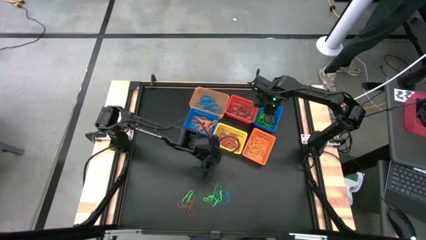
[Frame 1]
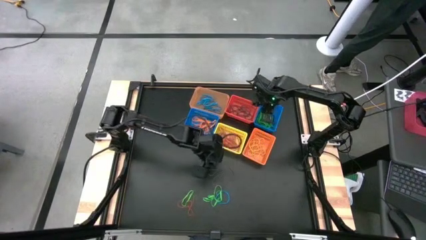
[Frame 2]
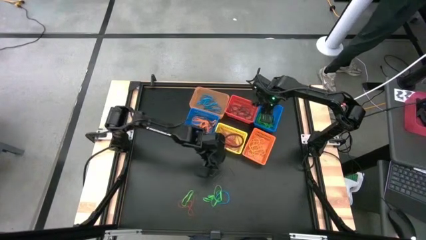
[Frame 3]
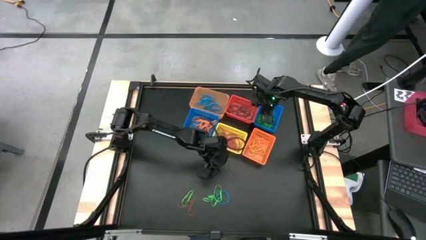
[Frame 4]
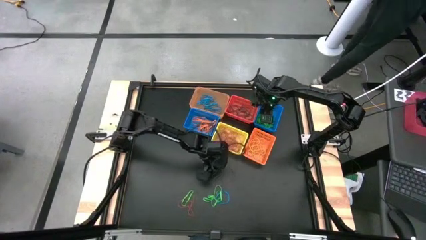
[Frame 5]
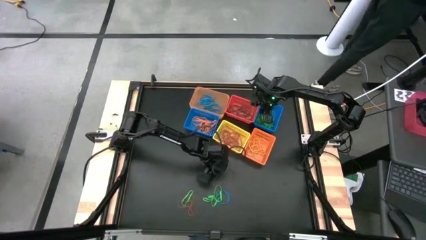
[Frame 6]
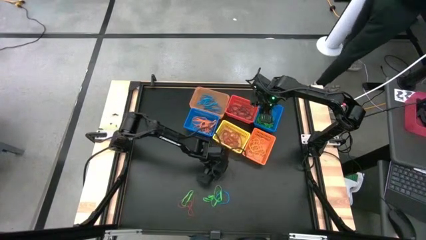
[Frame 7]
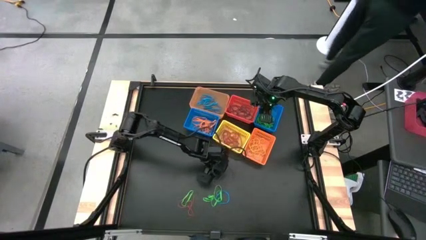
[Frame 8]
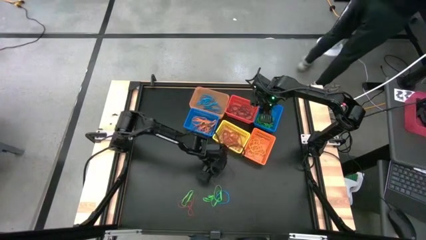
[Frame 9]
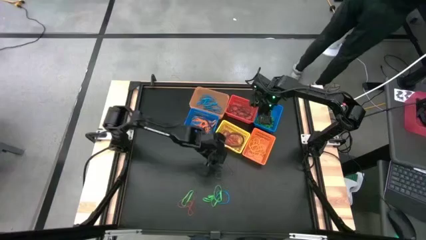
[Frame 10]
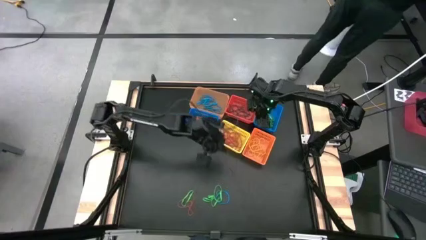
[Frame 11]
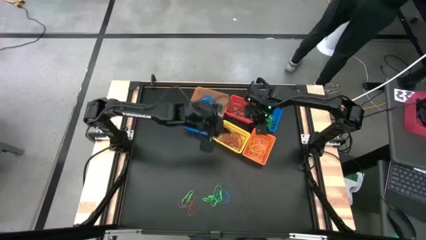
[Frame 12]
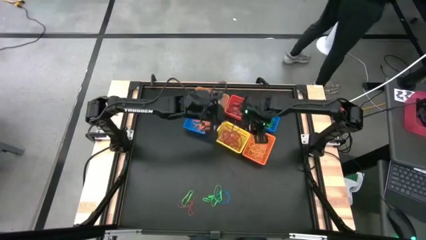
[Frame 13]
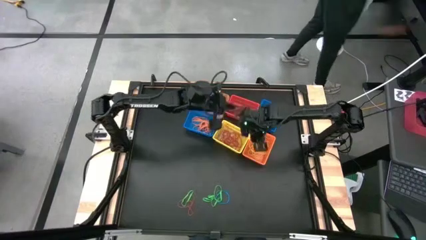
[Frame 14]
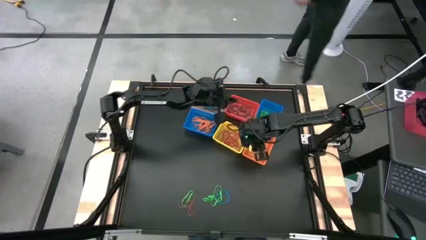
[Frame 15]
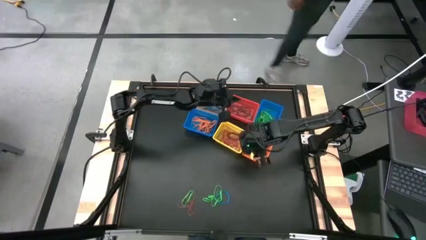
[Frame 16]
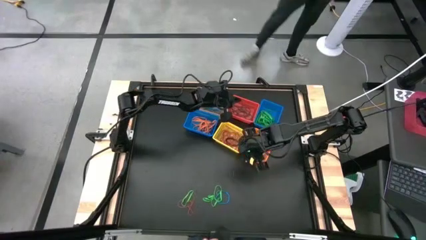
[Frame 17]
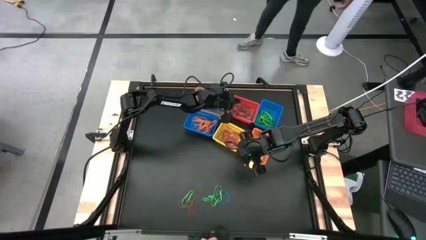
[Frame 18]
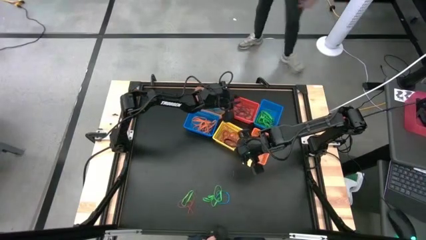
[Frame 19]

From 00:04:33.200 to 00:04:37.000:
Task: Sort rubber bands into baskets
Put the violet rubber band into the pink basket

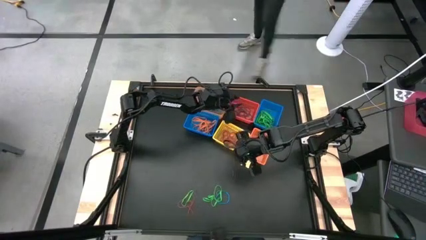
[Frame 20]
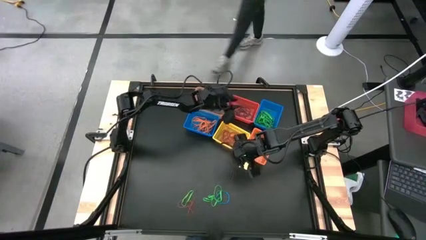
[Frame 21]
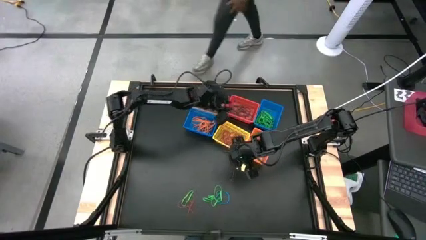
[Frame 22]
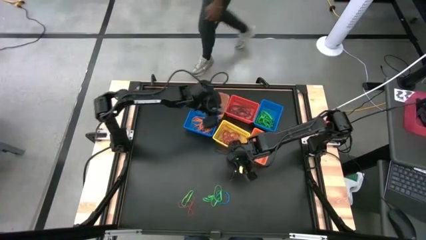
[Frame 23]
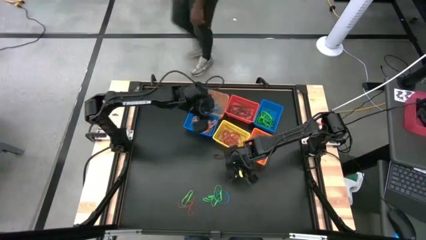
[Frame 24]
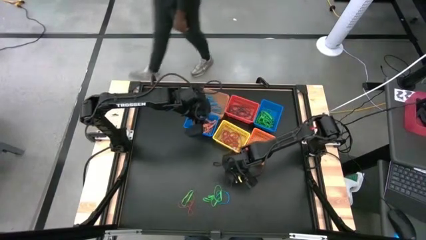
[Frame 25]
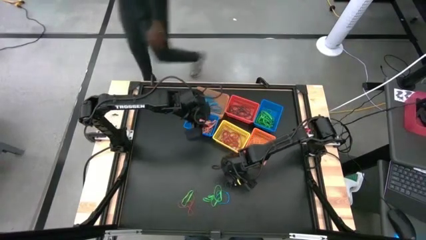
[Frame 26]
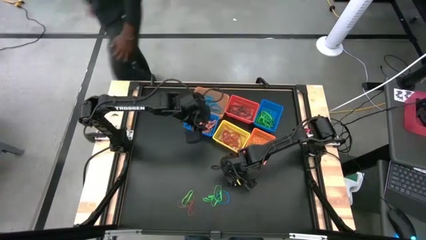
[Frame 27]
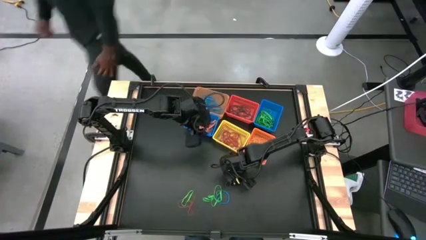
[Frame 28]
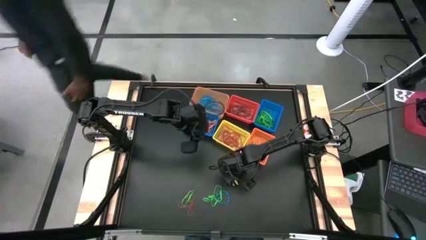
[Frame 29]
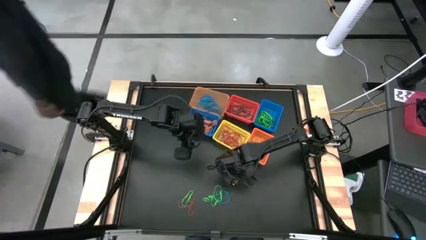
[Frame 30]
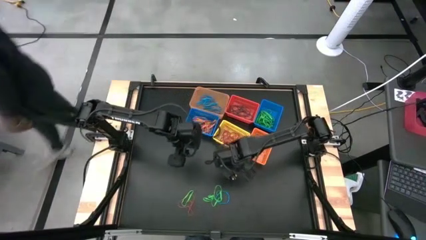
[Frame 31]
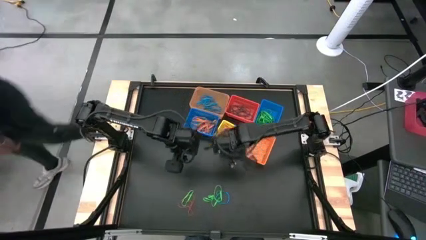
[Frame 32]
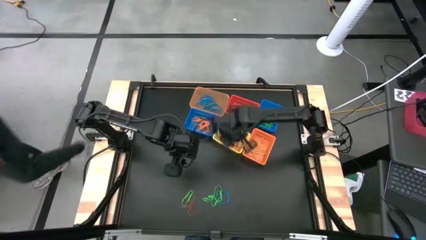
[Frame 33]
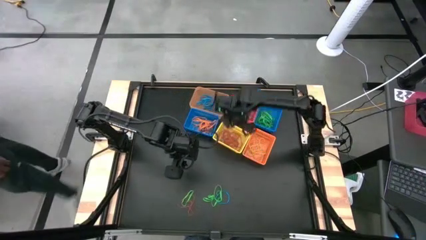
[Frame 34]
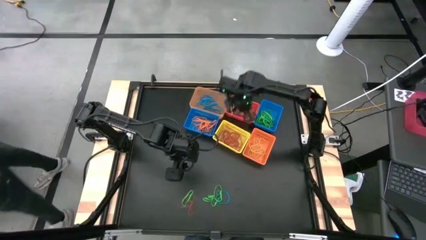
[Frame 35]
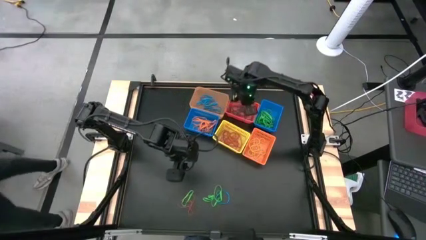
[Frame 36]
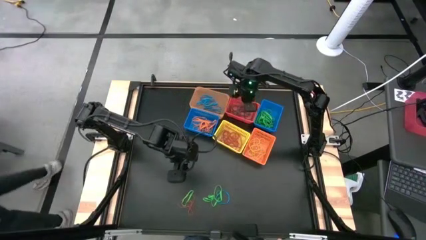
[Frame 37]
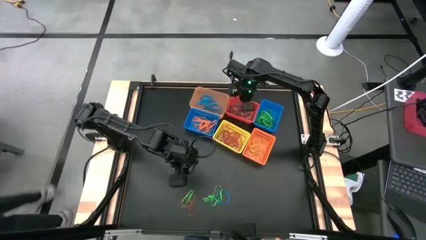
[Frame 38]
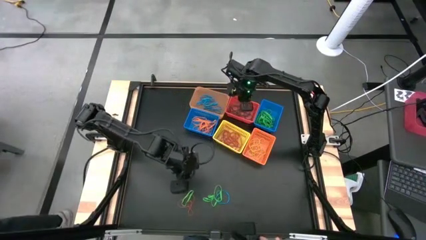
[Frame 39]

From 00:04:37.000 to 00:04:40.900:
Put the violet rubber band into the pink basket

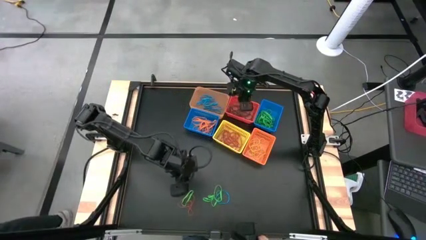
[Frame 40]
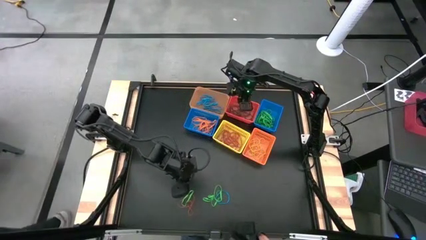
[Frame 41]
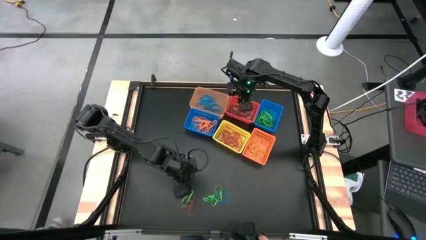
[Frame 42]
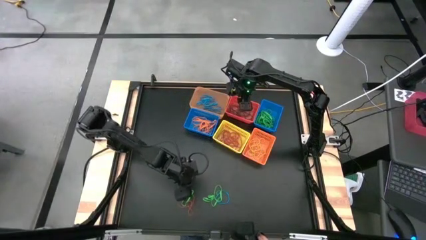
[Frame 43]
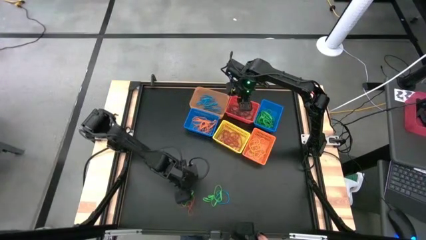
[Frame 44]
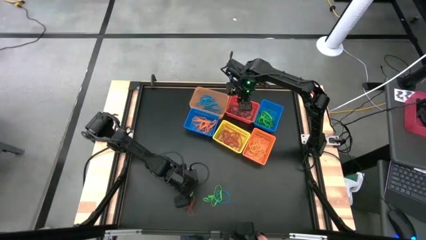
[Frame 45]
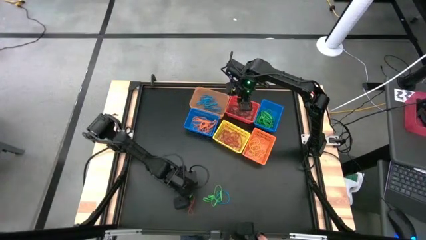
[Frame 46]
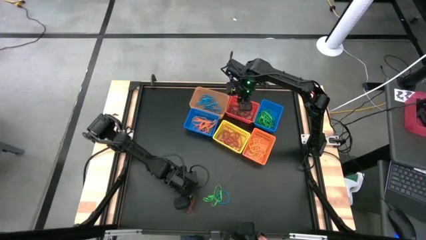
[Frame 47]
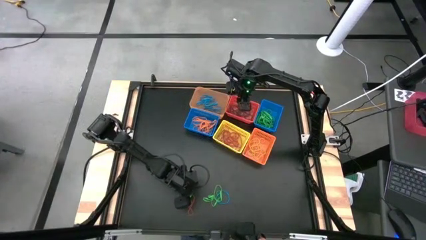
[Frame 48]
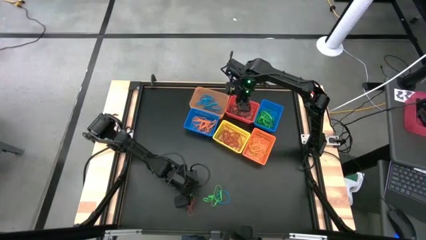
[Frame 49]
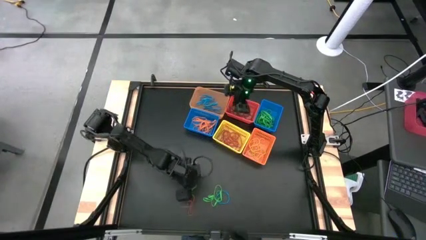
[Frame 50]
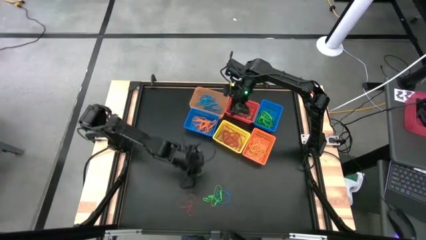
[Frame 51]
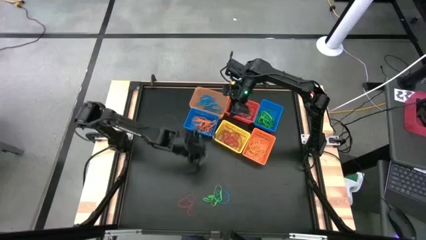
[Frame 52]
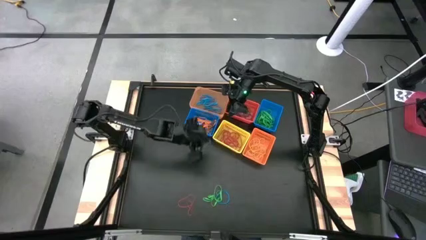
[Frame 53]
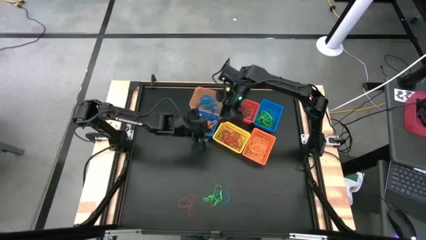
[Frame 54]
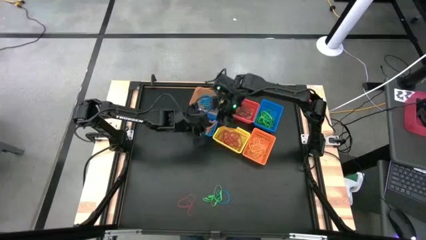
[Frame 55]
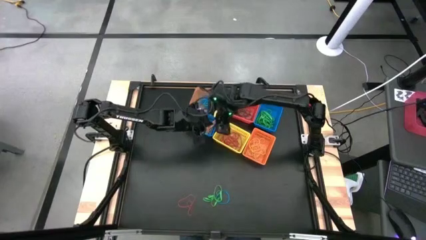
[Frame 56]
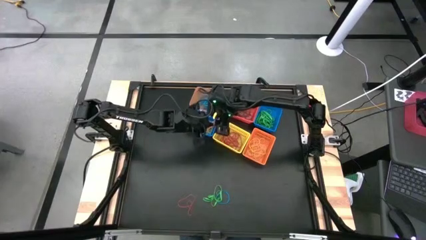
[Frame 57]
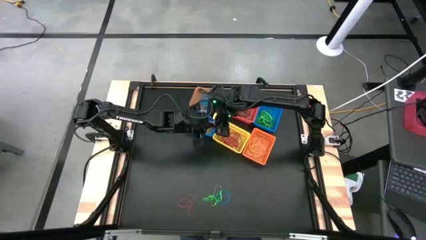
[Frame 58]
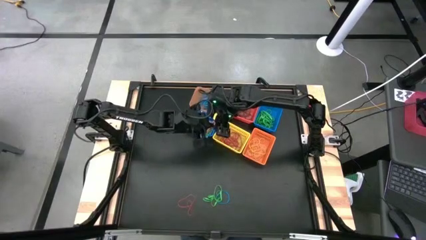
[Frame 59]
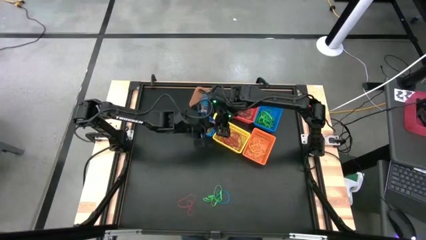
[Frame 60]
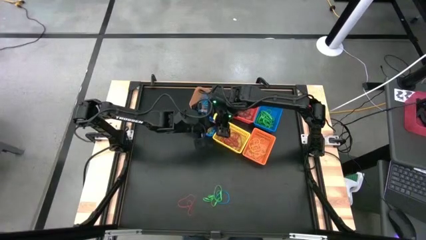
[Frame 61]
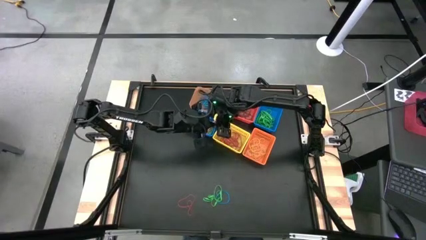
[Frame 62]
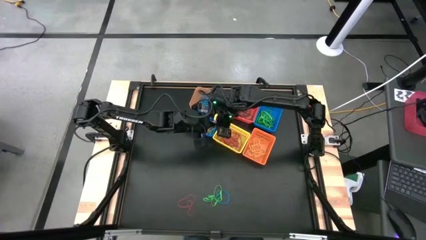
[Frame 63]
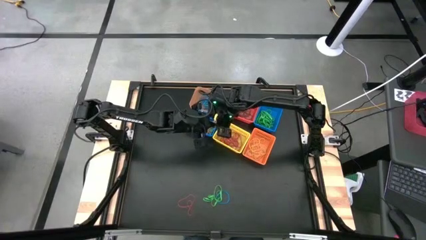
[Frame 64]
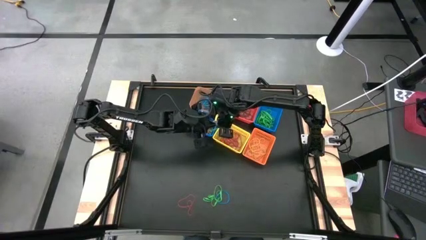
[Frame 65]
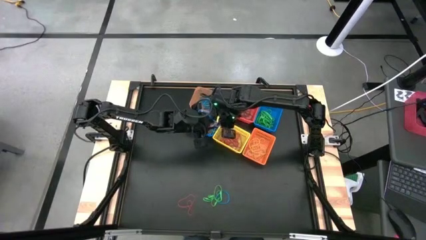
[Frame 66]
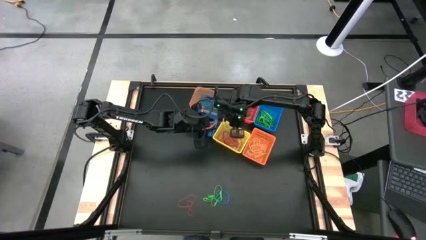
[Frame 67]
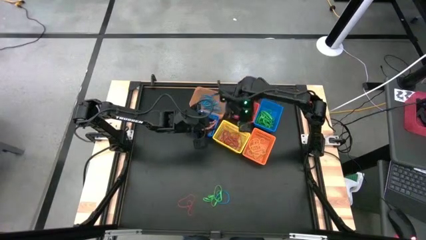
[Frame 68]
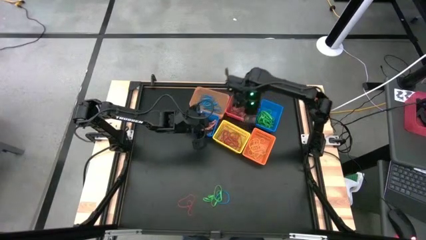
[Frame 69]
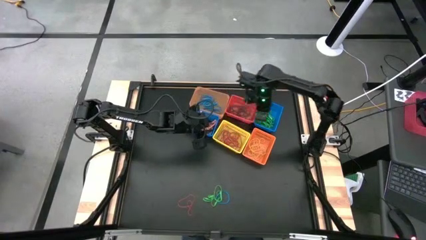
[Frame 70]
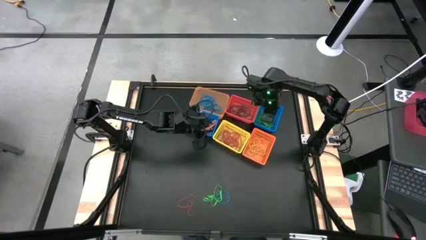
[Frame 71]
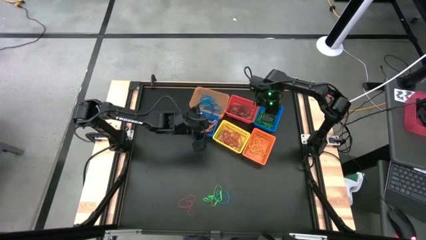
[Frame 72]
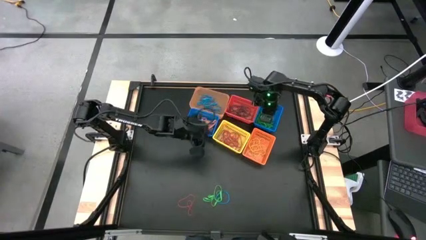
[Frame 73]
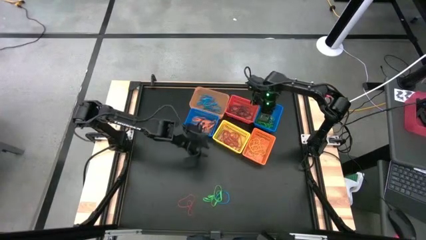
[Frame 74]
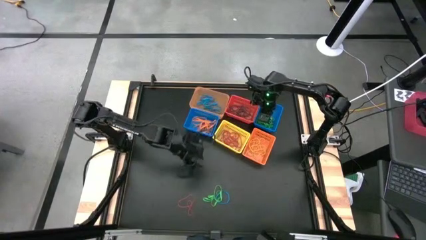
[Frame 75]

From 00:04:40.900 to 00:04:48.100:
Put the green rubber band into the right blue basket

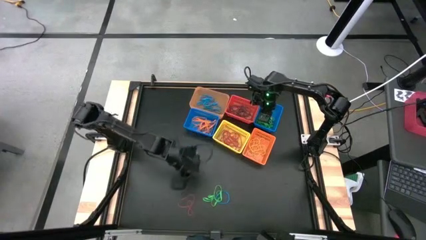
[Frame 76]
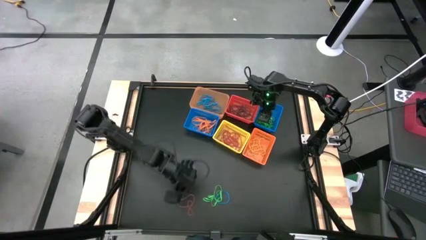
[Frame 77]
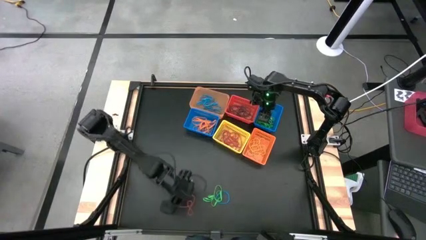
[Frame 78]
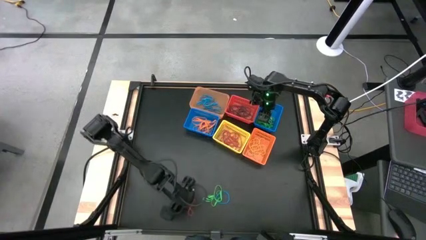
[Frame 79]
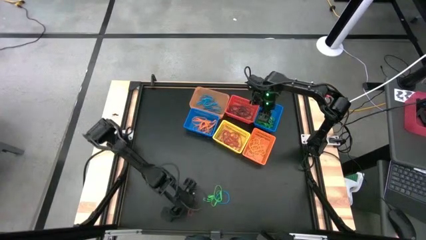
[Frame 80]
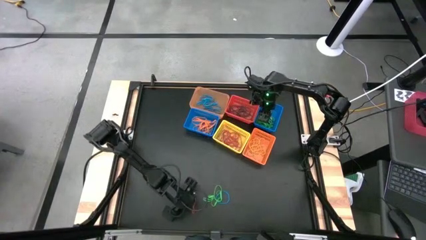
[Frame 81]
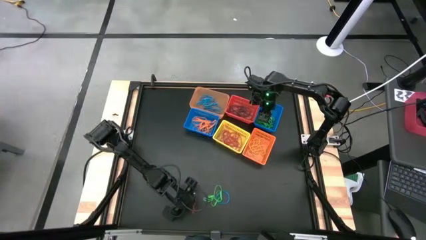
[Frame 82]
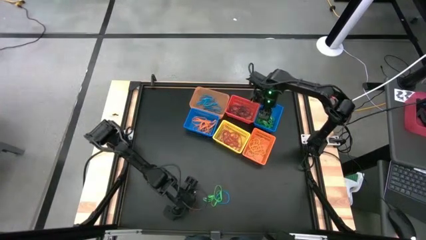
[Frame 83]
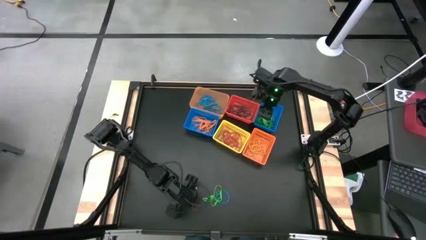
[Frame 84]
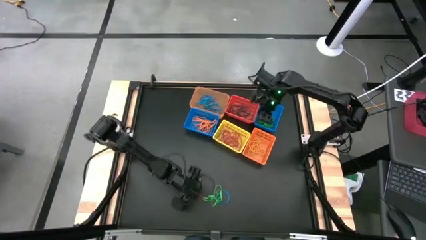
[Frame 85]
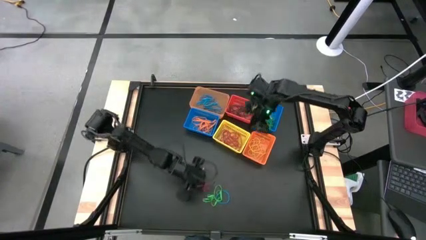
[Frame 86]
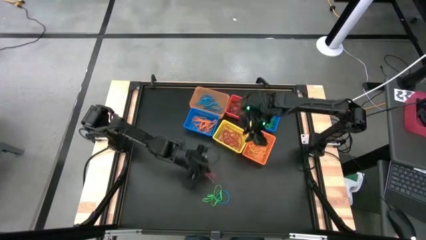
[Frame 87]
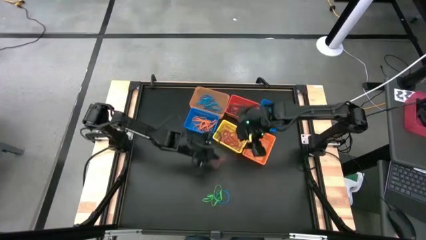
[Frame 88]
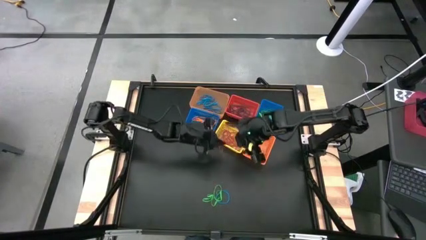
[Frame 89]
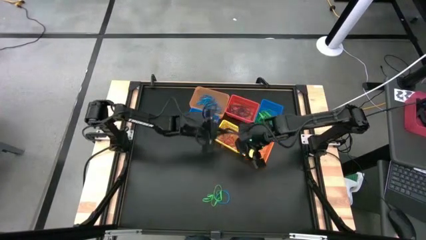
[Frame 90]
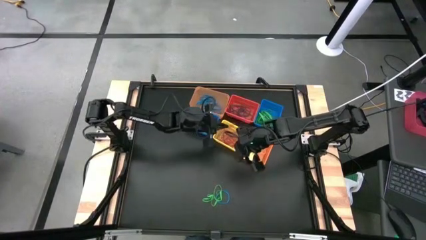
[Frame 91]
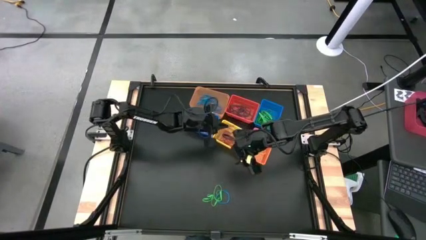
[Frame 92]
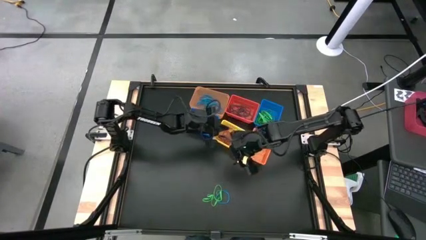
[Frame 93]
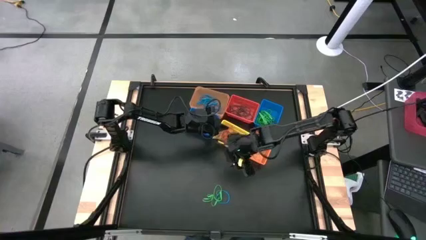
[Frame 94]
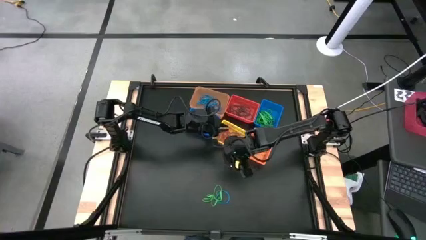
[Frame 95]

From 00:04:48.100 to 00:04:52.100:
Put the red rubber band into the yellow basket
